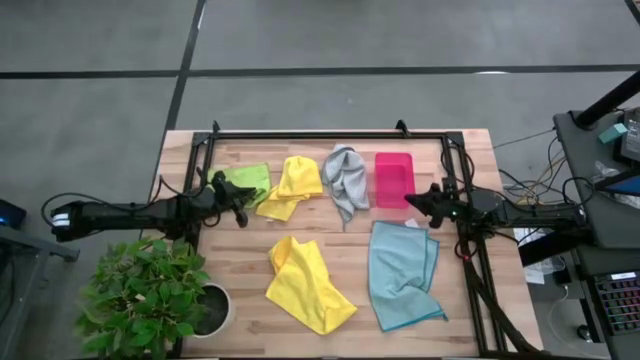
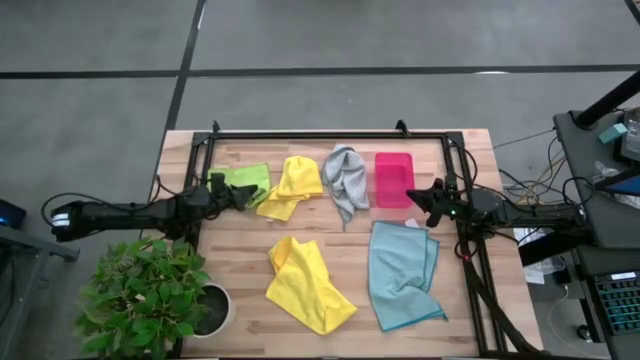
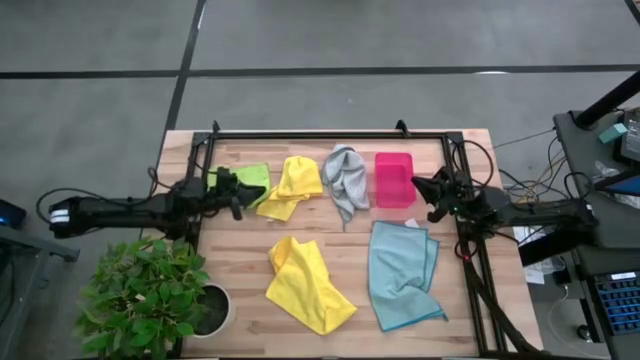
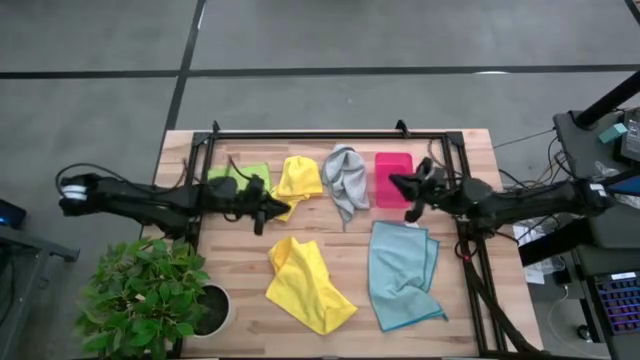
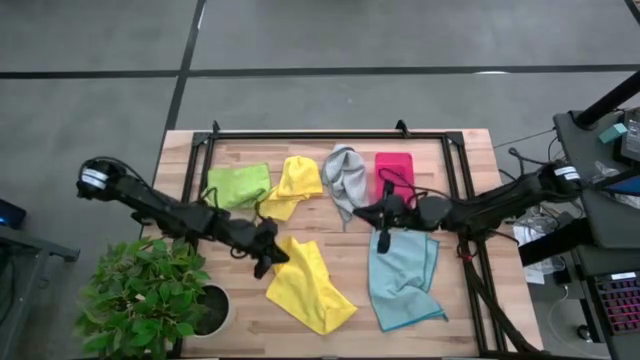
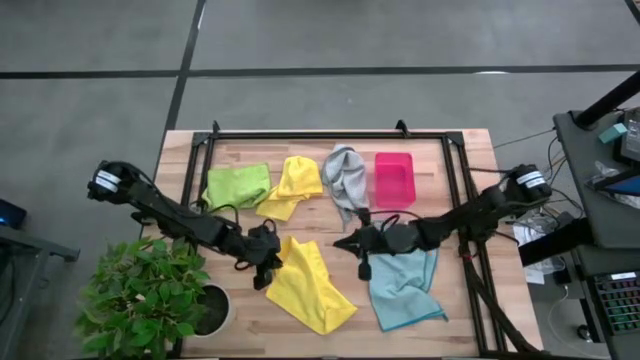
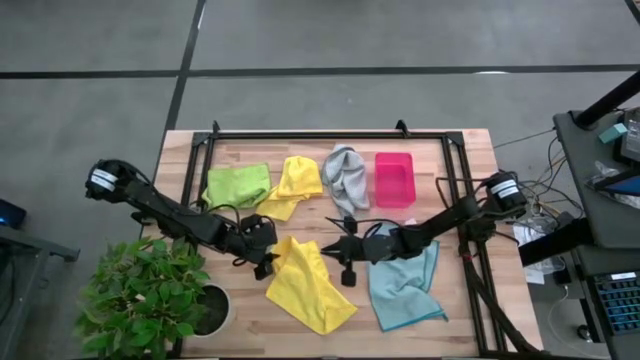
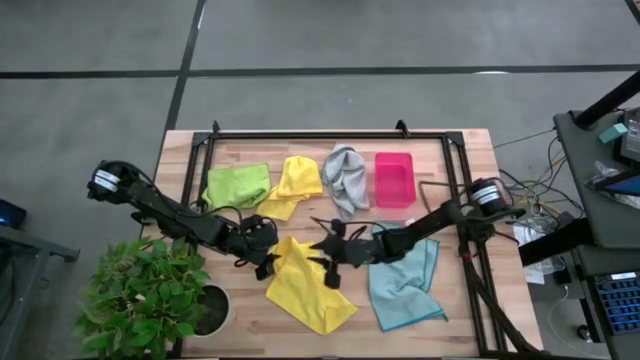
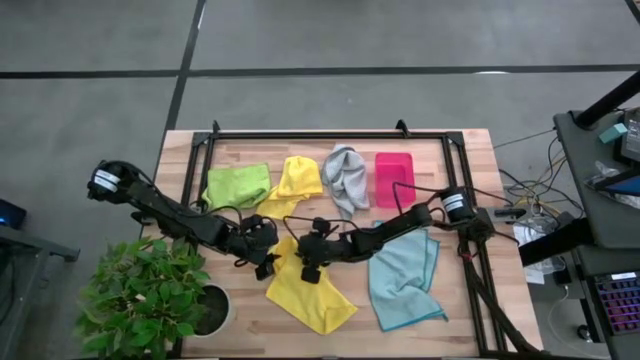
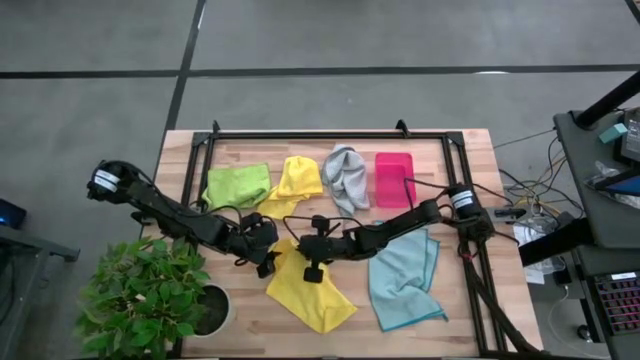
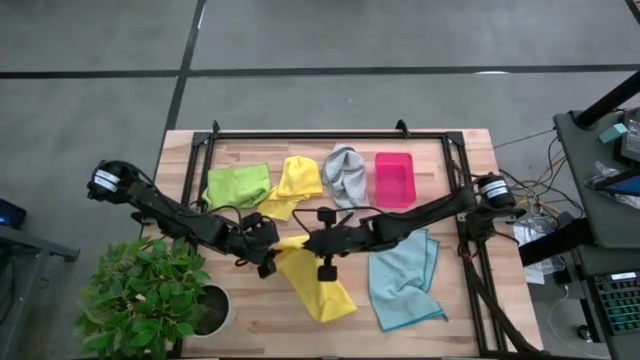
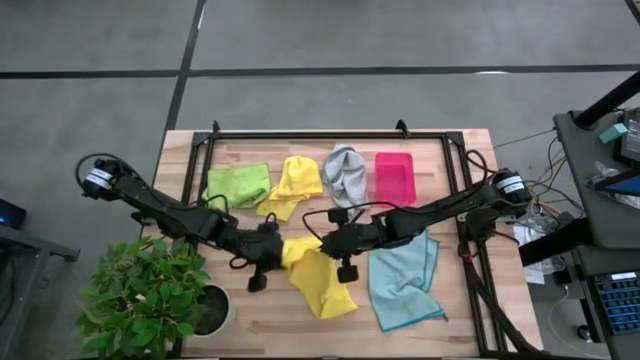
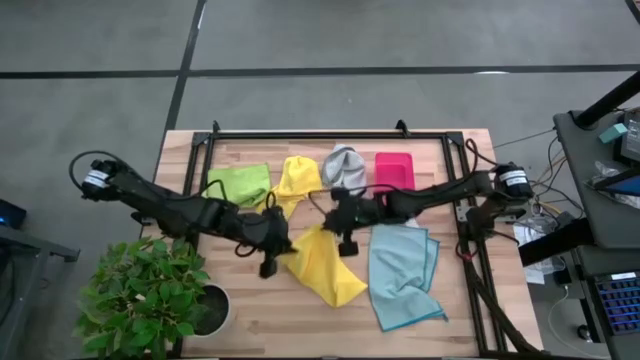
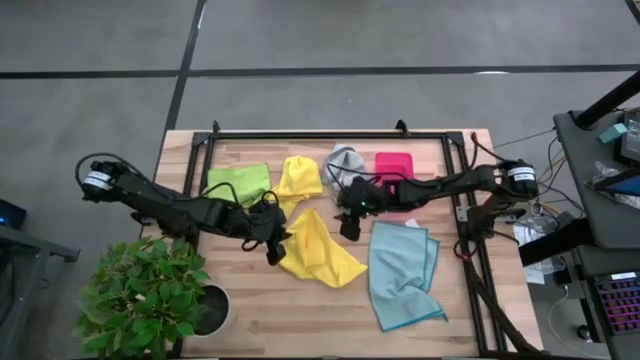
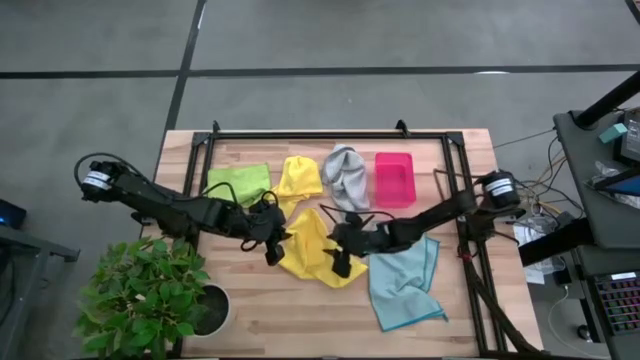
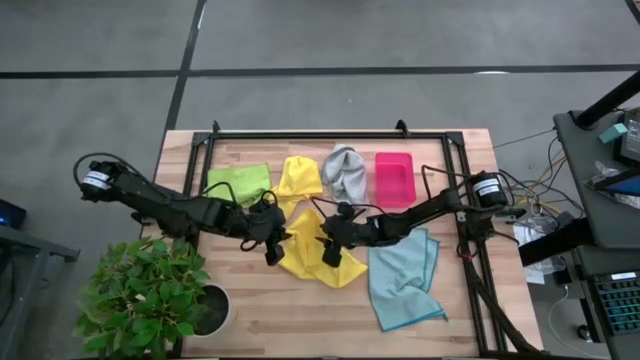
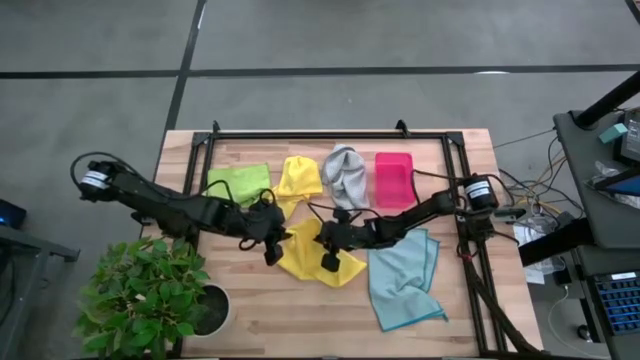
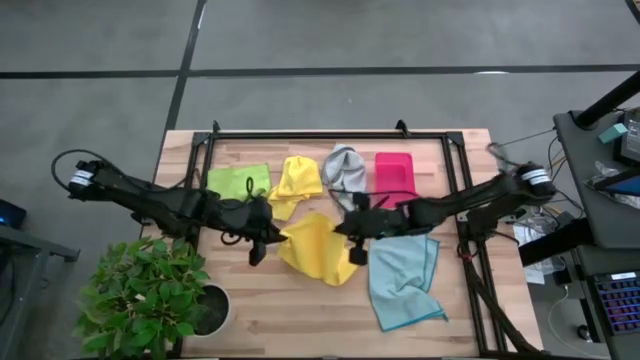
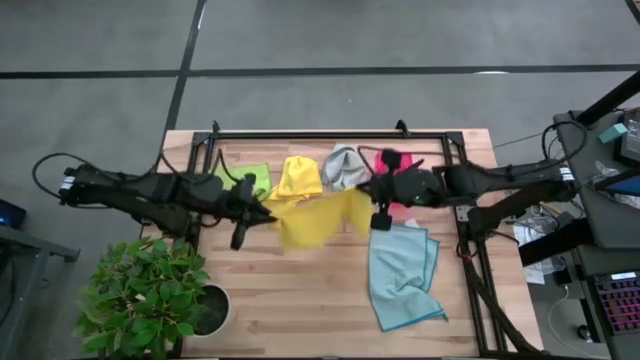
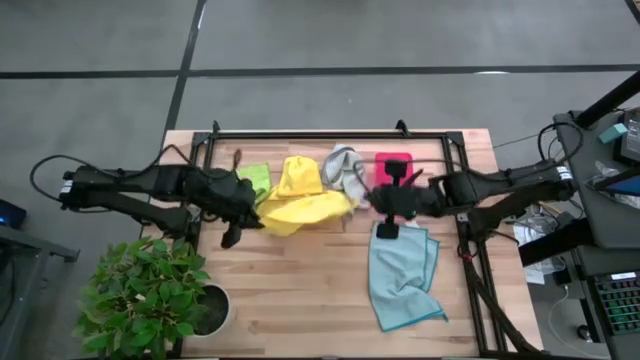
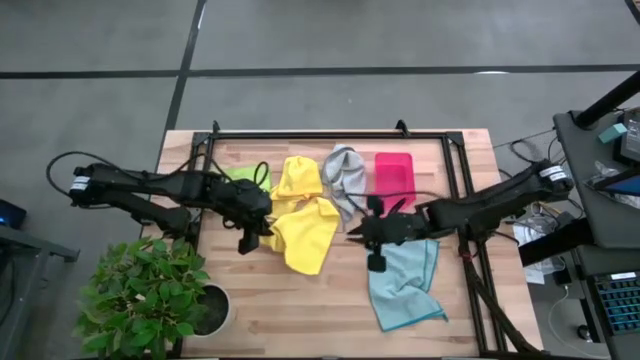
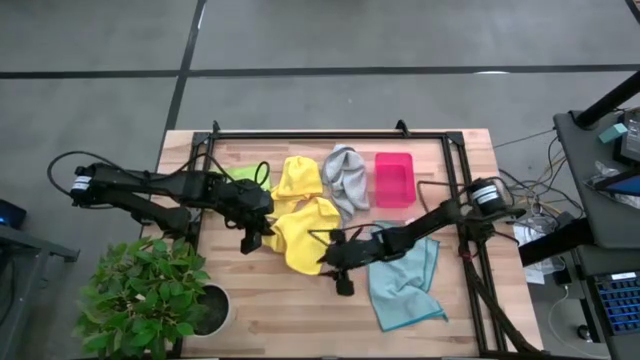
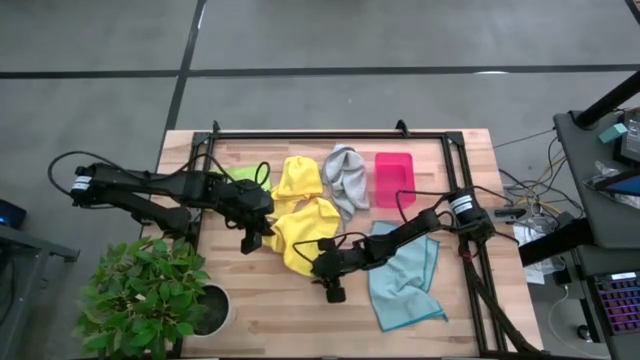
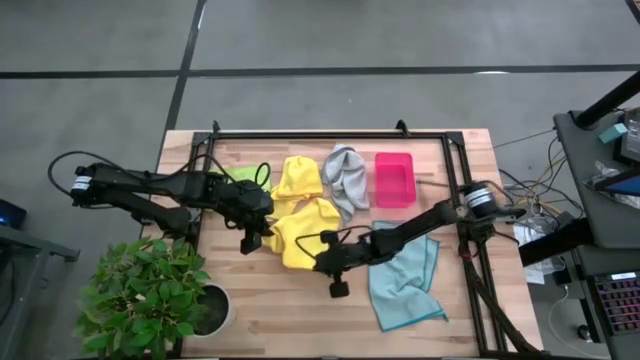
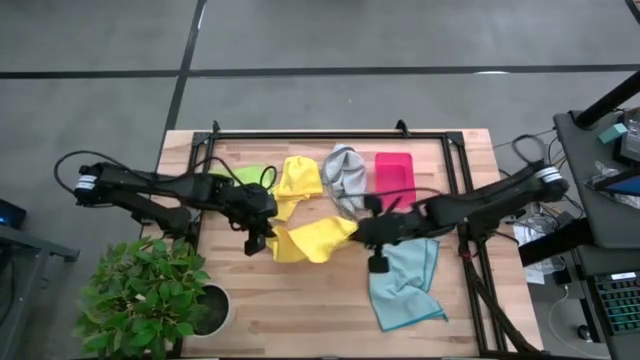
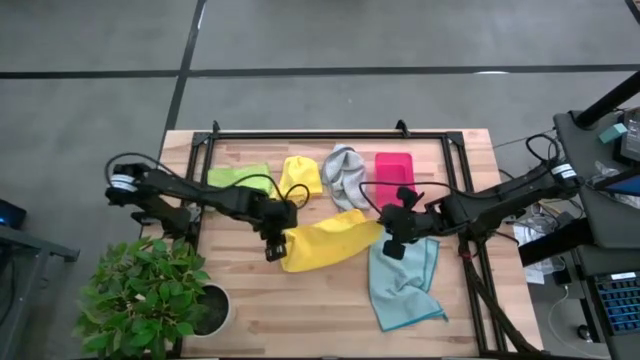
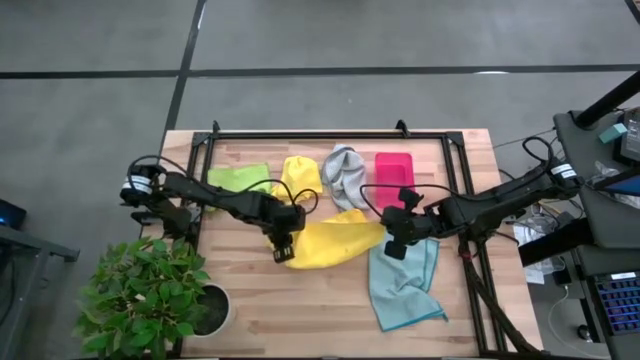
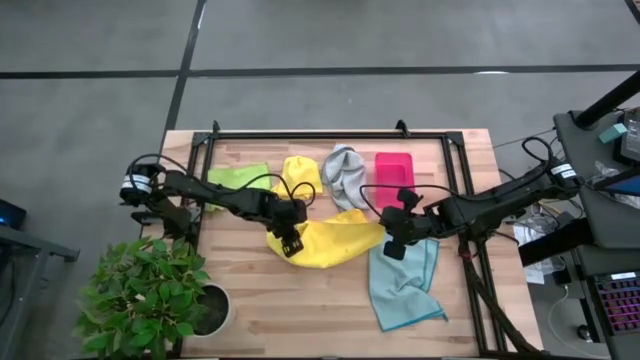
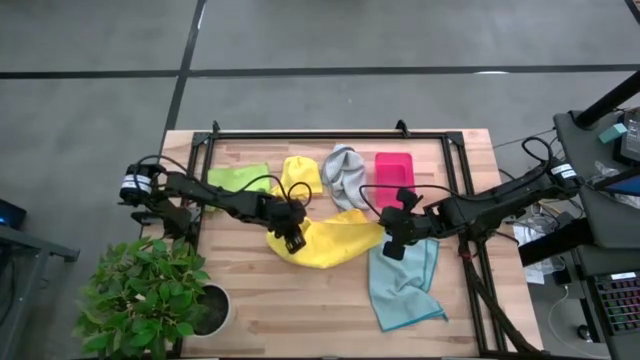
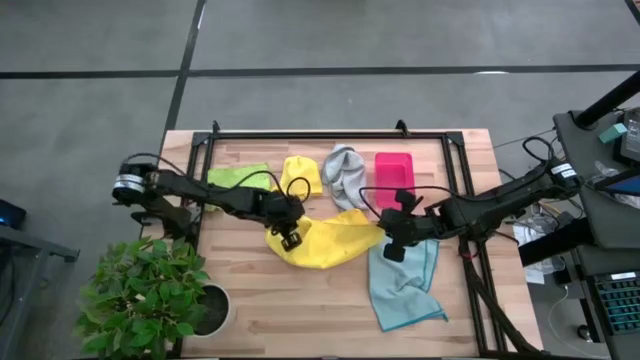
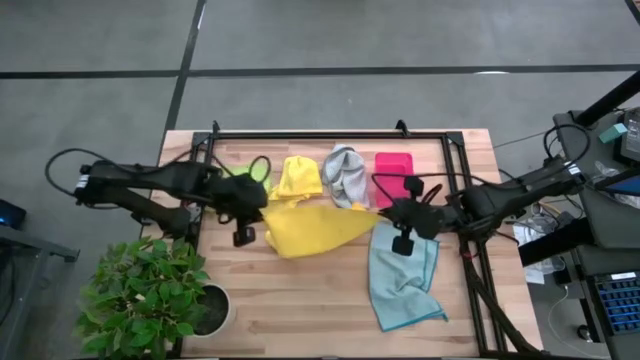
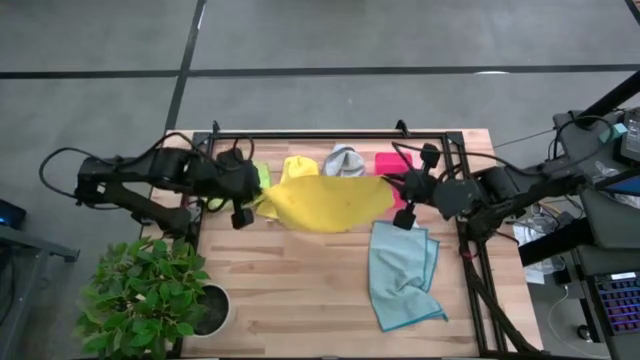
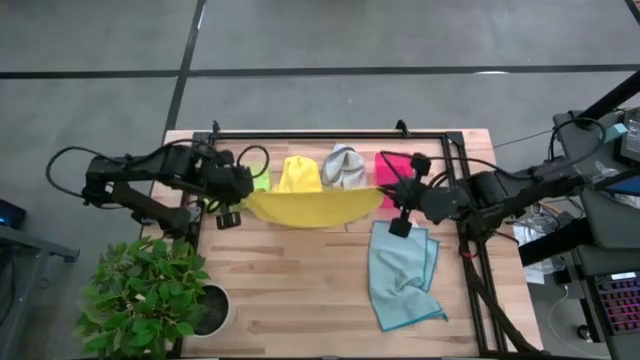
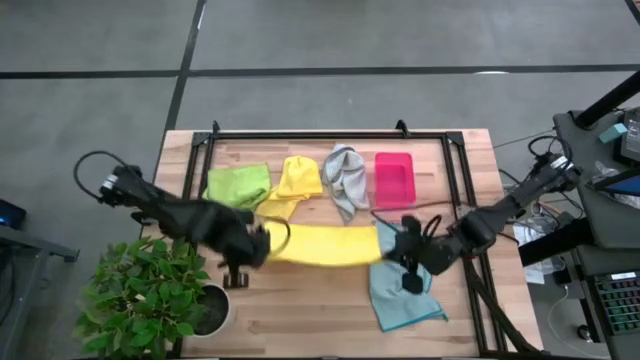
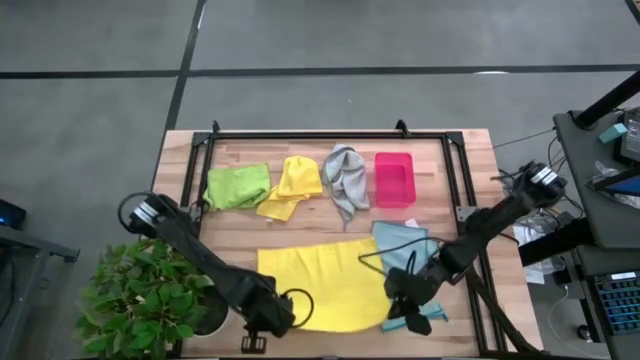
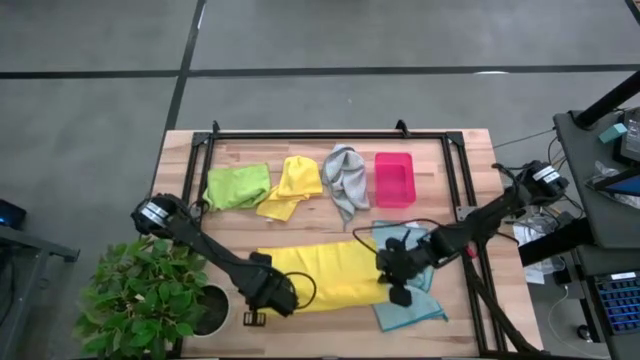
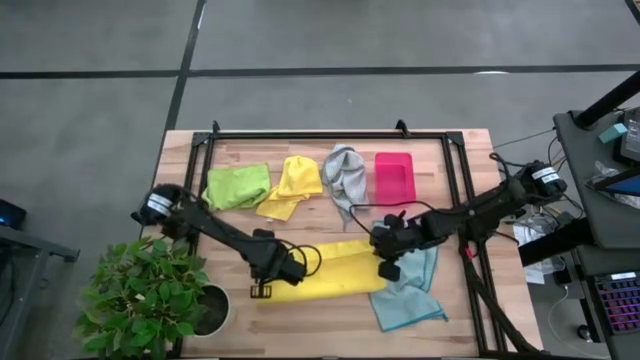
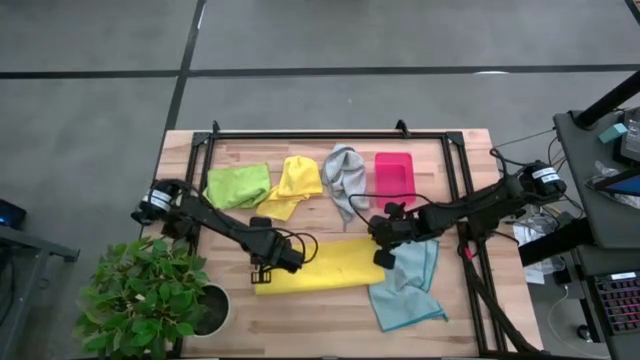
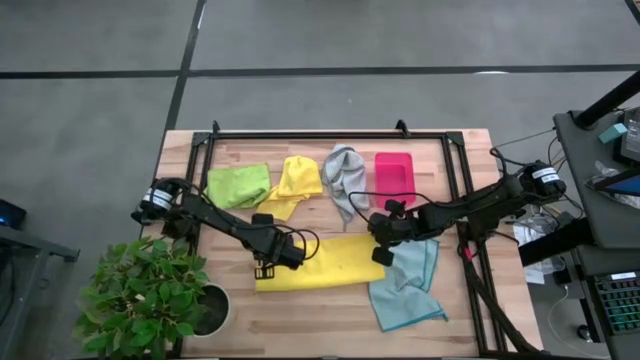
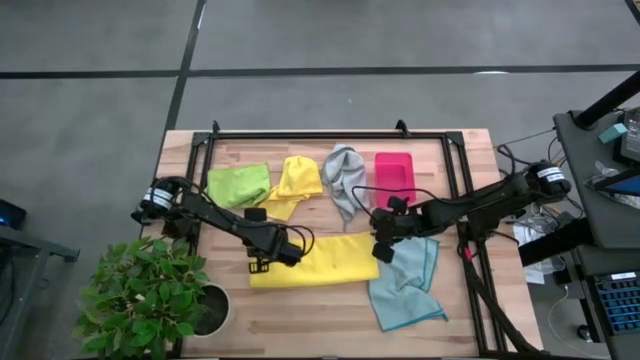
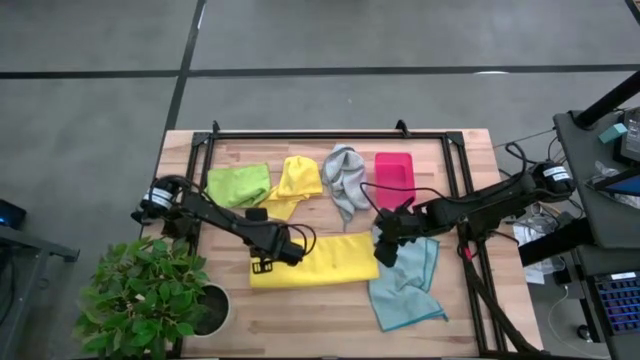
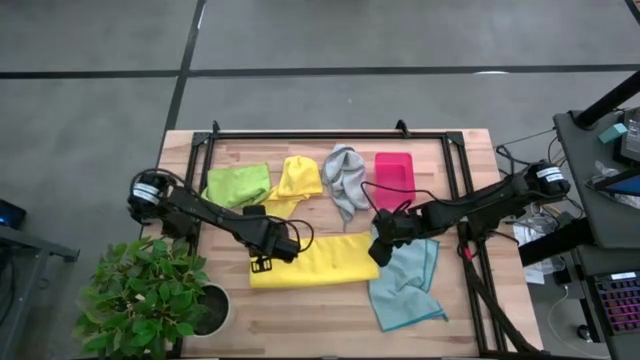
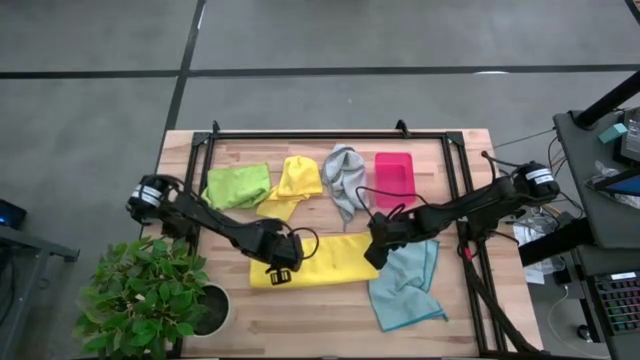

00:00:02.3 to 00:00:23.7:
Task: Fold microfiber towels
Fold the bottom yellow microfiber towel
